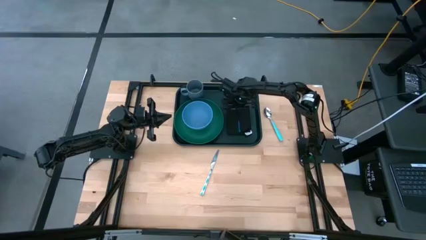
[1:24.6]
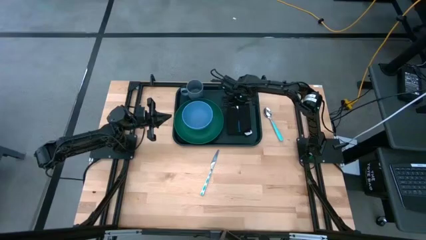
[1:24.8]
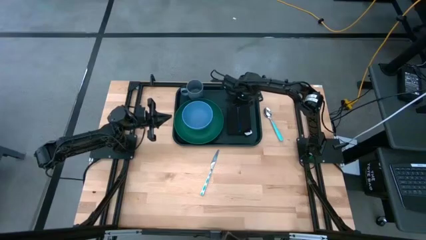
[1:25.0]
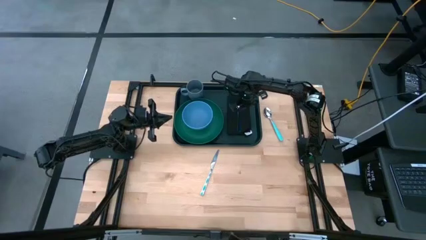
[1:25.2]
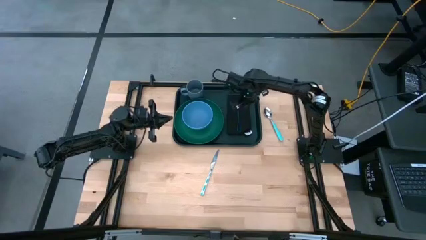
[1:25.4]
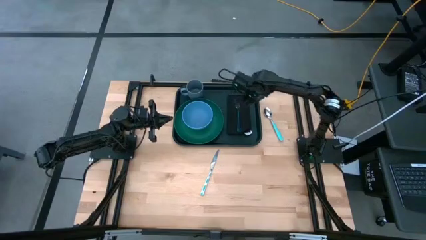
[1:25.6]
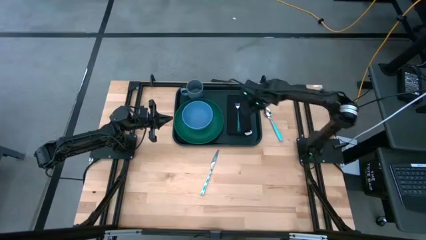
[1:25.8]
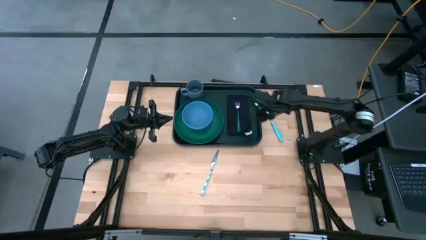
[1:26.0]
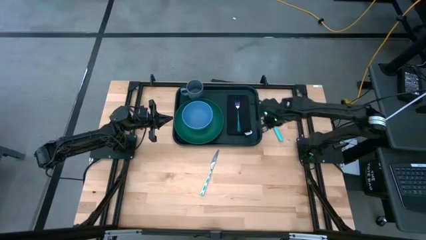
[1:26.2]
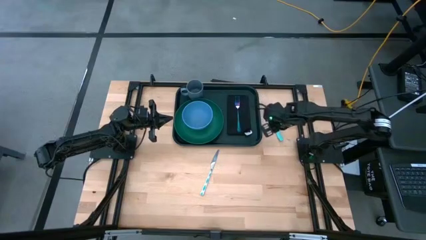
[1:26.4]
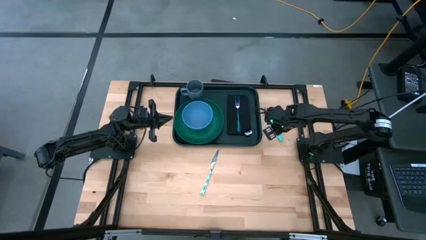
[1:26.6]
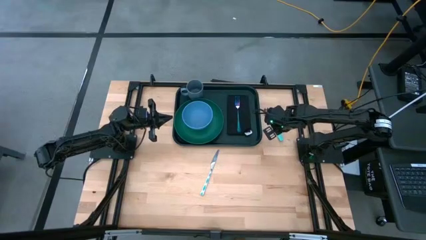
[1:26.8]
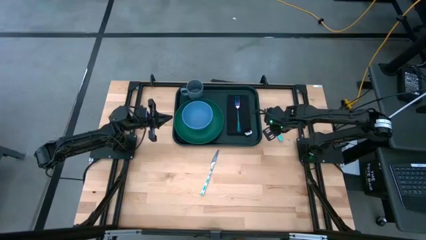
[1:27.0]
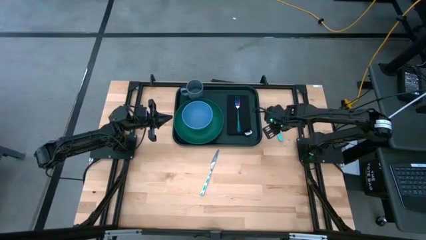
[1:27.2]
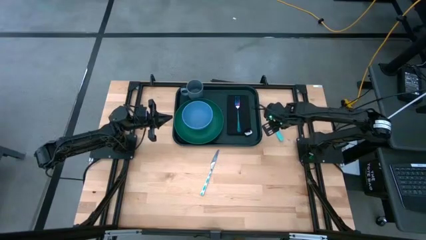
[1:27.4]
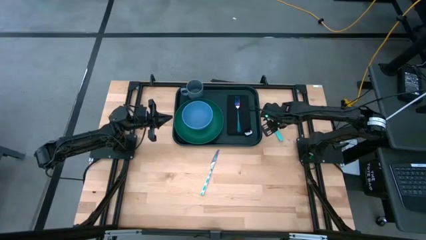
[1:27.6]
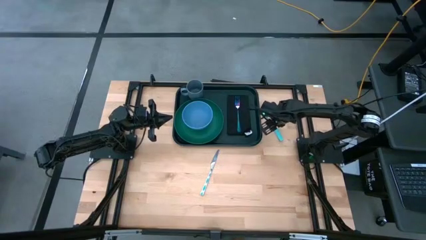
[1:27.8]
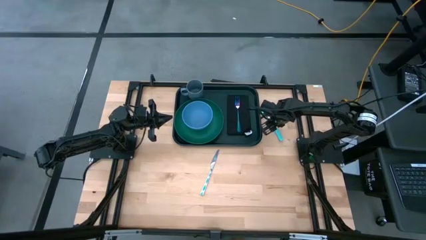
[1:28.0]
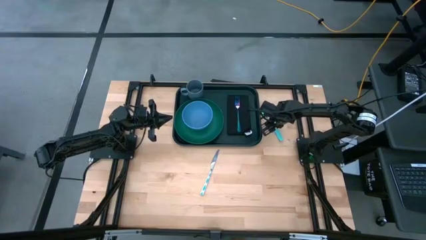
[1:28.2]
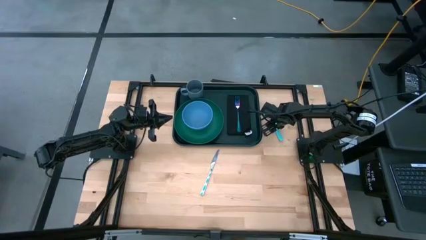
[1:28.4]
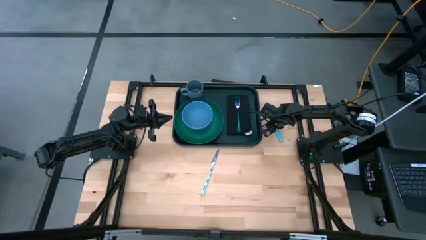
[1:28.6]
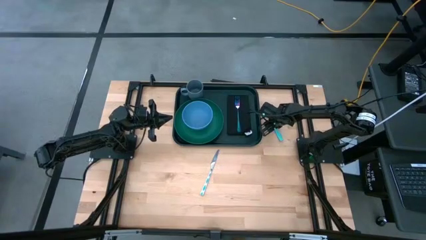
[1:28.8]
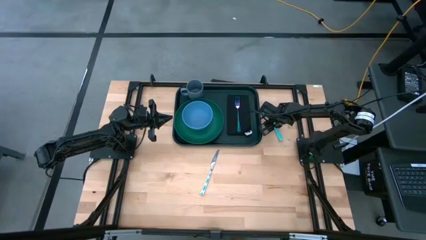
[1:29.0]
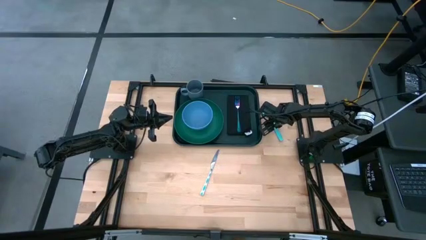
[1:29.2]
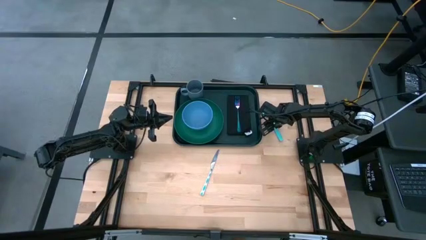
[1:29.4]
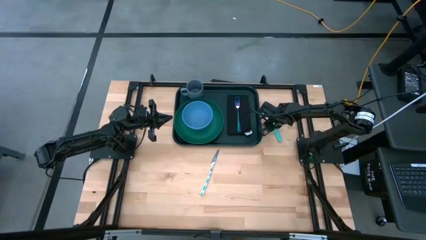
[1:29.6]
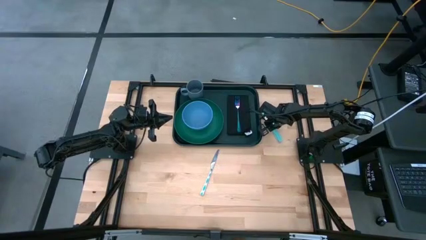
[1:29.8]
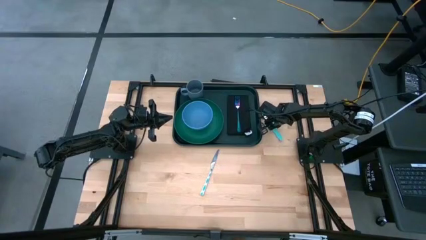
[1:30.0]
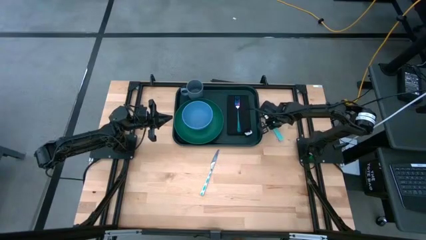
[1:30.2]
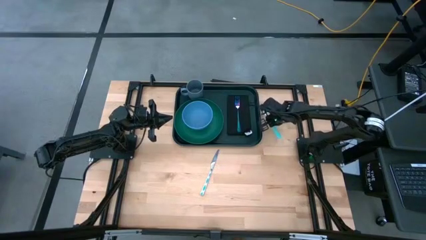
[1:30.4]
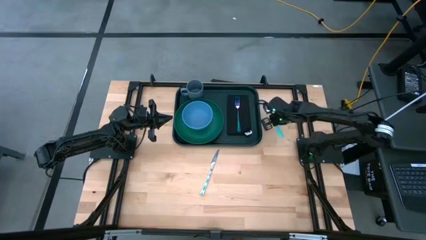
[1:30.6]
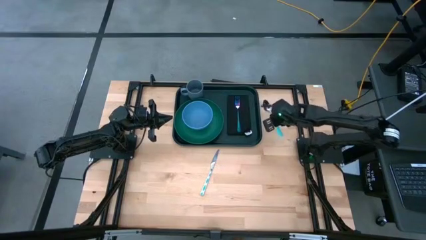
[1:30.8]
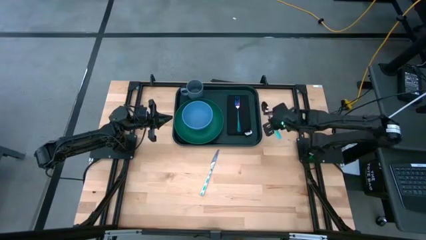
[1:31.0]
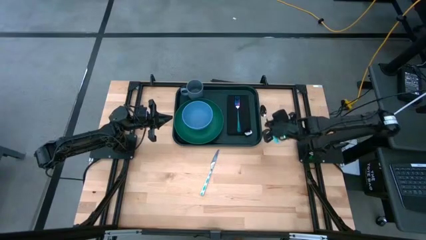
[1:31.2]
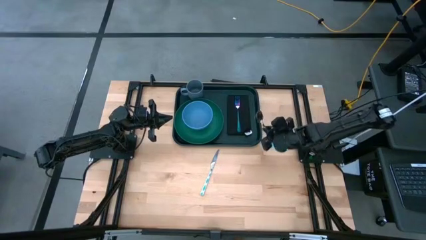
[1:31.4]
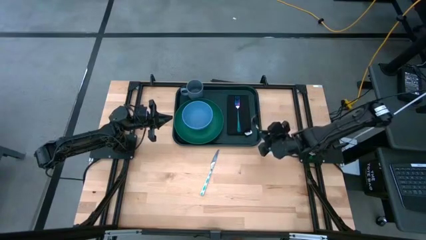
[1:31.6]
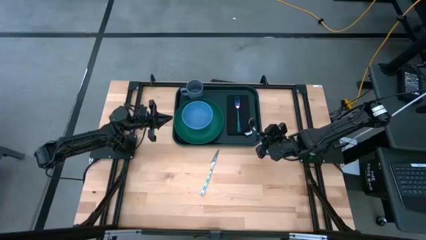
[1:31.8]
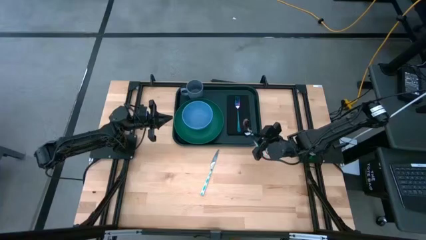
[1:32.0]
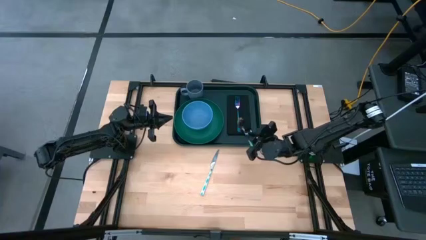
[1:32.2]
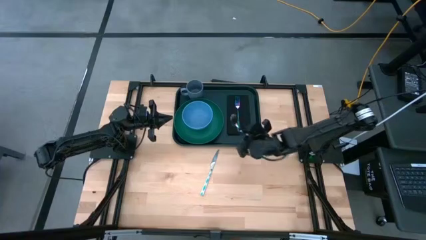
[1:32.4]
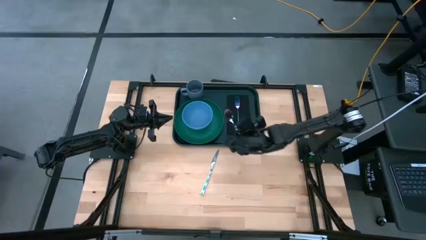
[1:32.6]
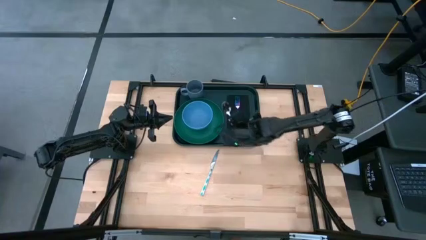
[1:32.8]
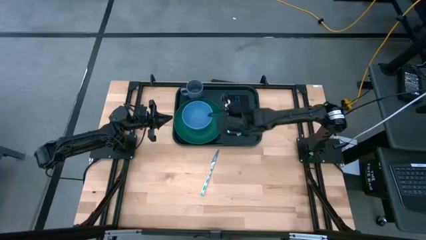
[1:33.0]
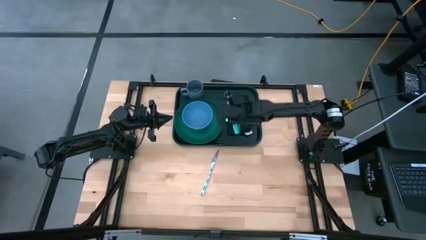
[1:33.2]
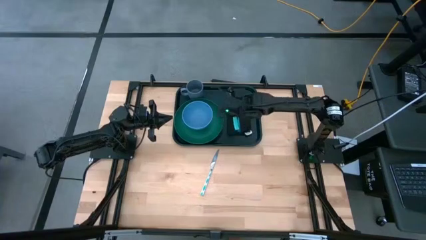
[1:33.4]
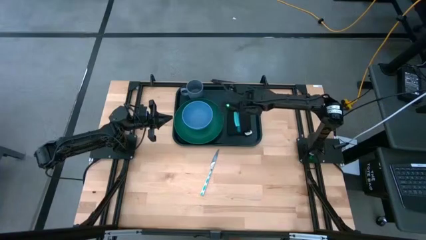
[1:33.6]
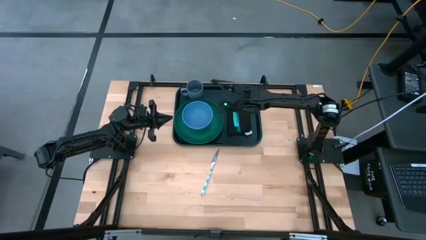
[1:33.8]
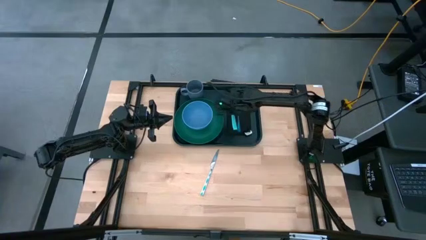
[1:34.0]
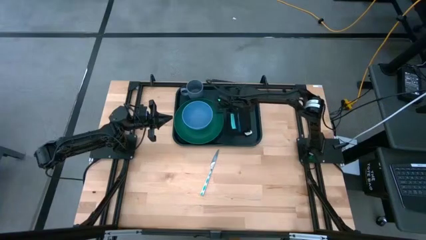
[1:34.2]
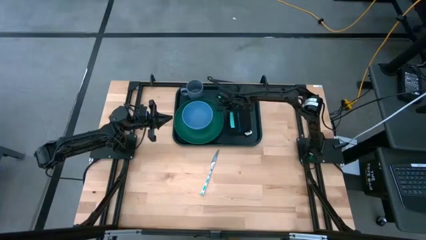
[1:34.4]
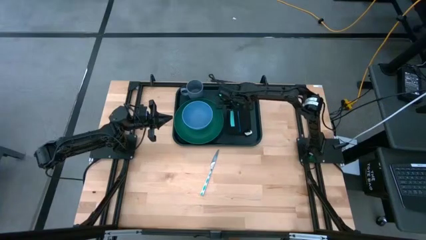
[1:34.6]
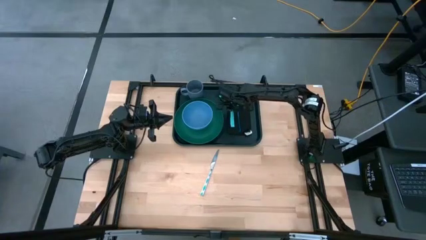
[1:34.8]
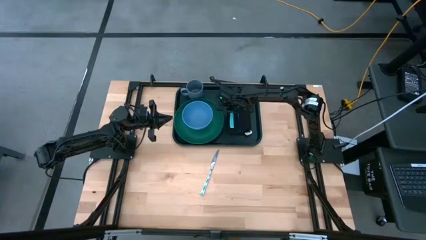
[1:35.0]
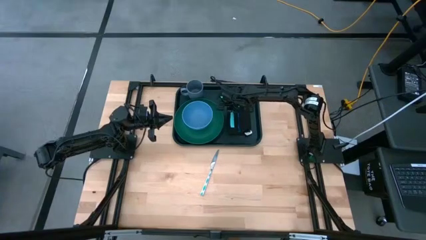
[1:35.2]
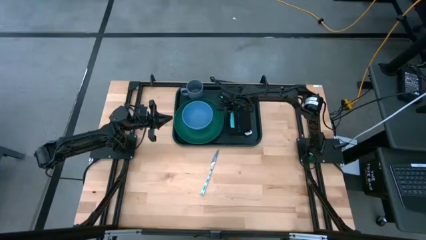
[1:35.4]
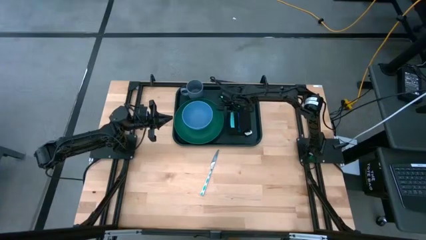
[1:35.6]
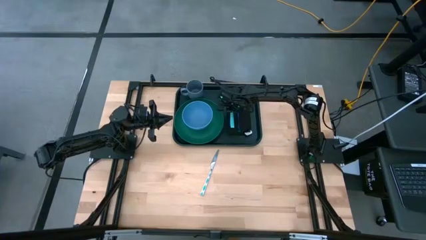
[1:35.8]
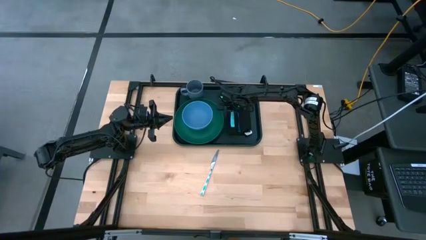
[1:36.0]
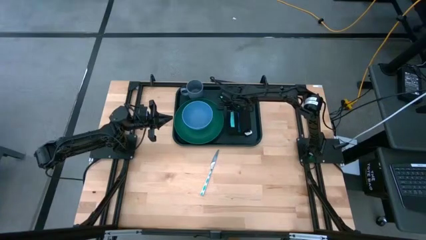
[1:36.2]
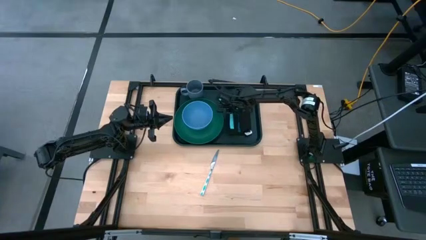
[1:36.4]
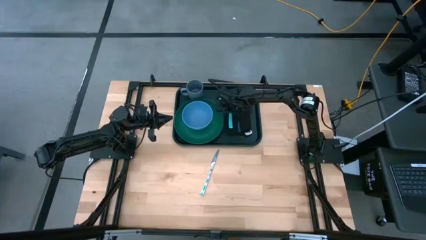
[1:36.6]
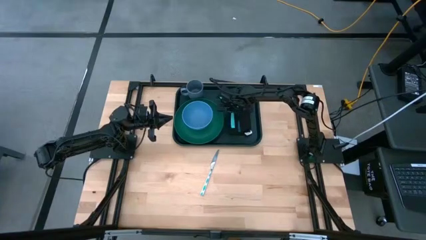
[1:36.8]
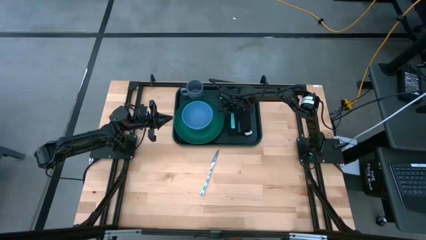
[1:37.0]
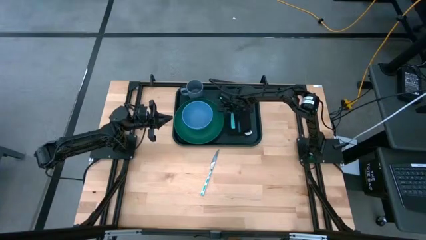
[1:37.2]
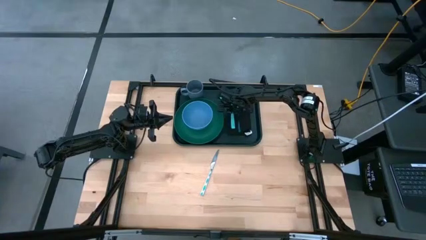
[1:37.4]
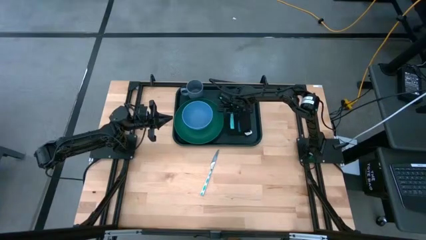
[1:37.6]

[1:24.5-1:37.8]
Task: Set up tray
Put the blue spoon on top of the black napkin on the green tray

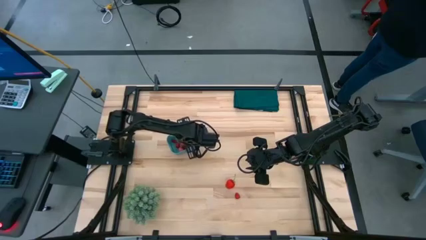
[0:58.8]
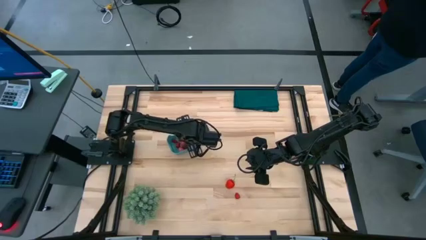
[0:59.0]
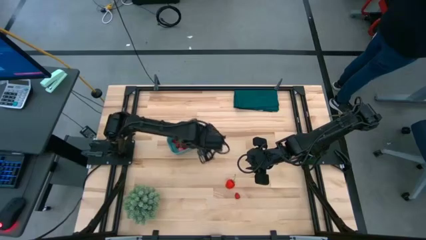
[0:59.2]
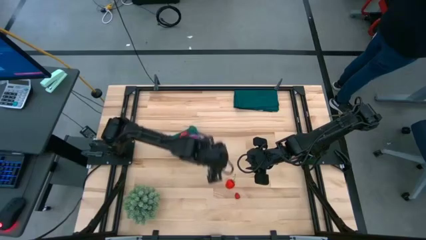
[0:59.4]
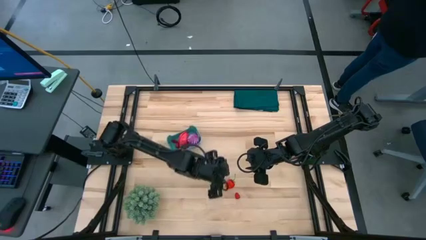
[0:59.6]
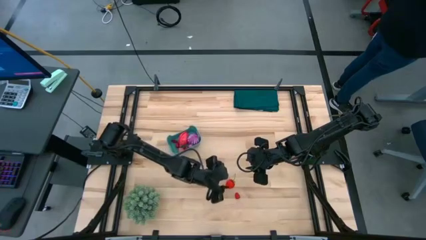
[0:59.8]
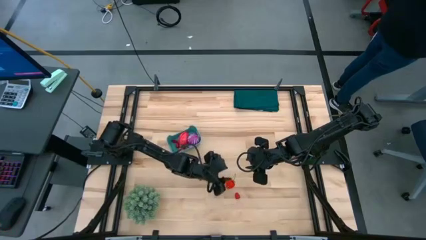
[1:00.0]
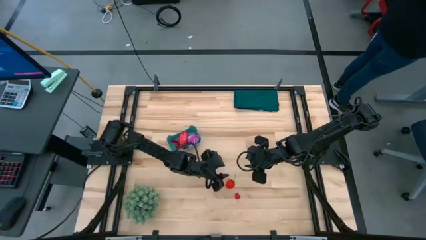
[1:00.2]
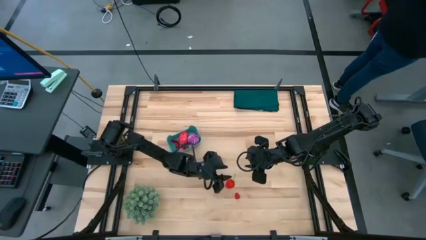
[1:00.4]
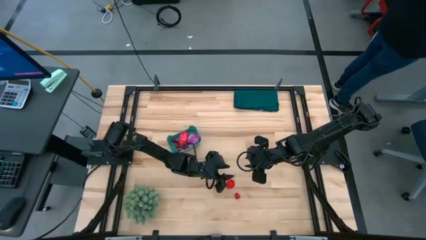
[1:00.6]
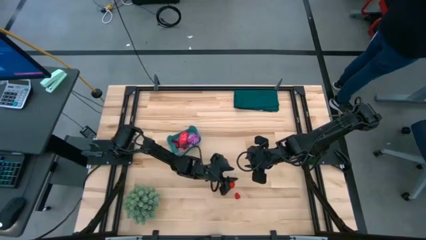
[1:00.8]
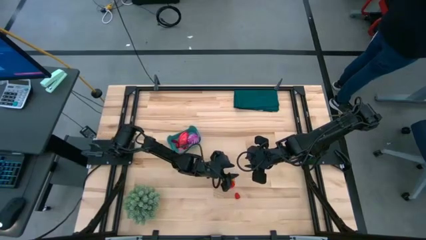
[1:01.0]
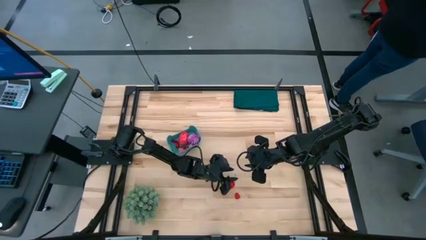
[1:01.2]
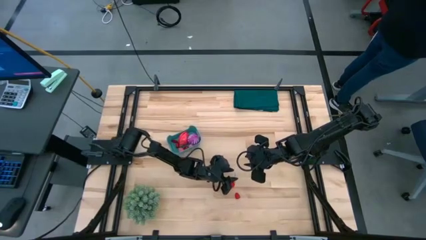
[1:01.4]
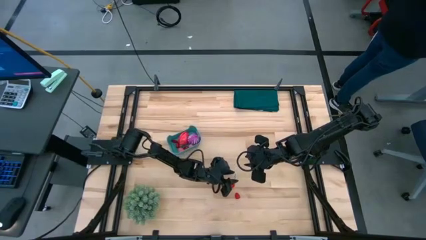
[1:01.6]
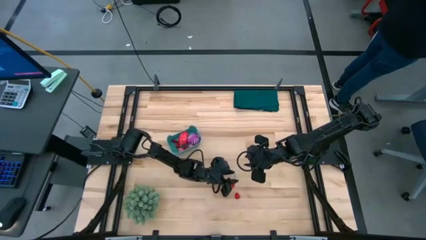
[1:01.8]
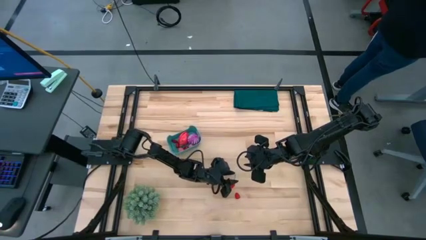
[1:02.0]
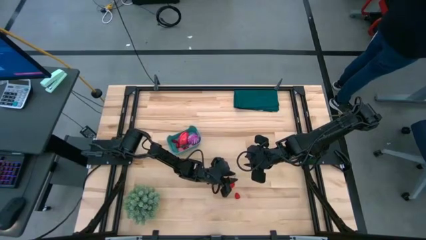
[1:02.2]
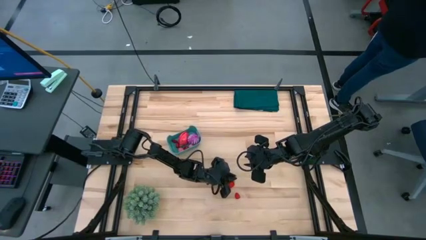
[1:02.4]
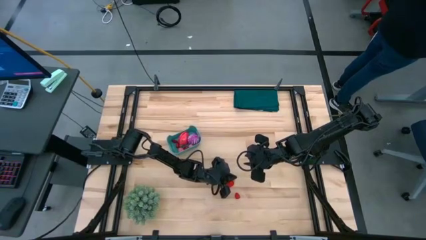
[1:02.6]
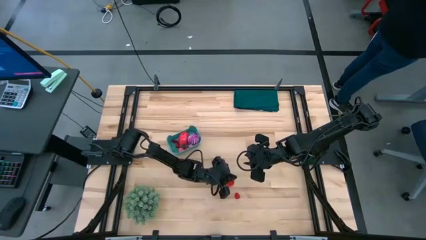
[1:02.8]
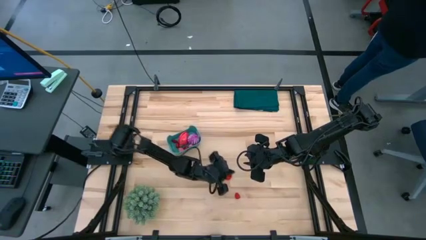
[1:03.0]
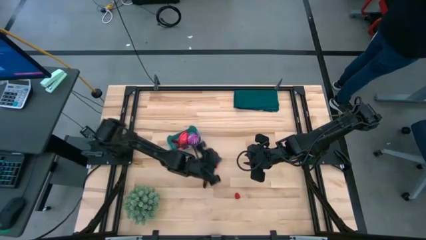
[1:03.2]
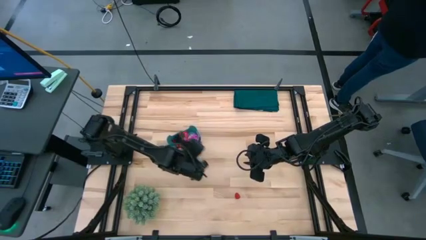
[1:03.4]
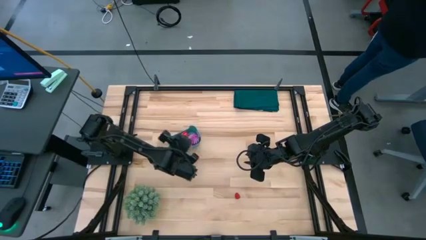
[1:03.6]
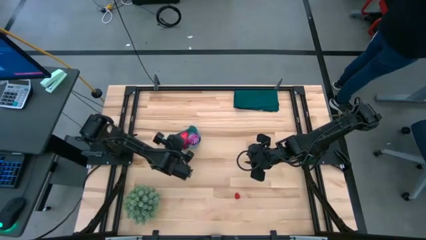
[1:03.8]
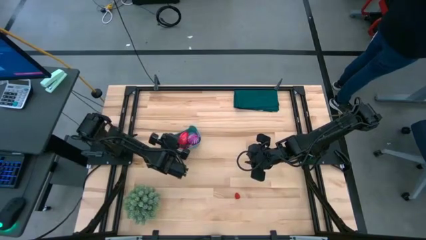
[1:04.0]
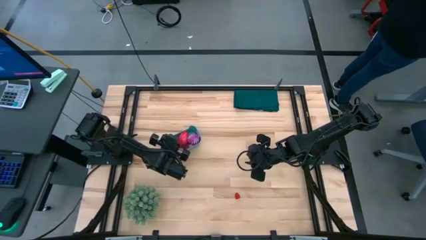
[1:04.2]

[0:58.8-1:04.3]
Task: Pick and placing Produce into tupperware
Put the red strawberry into the blue bin
